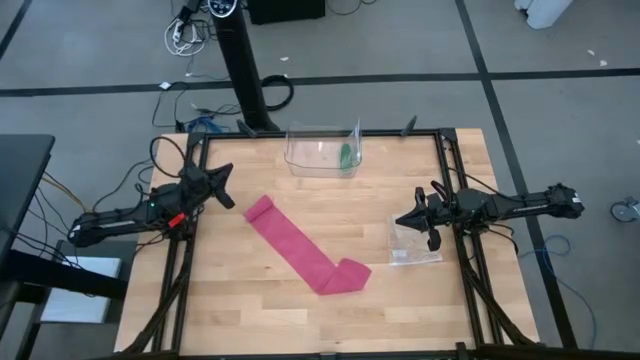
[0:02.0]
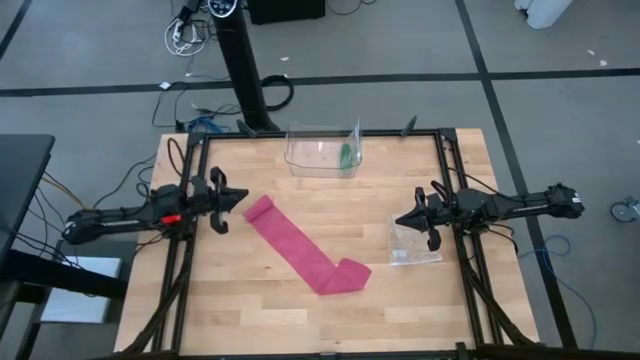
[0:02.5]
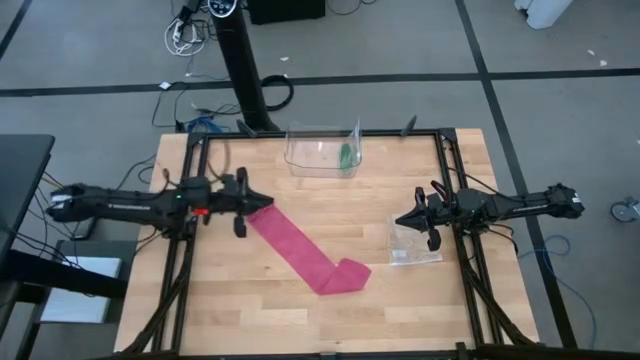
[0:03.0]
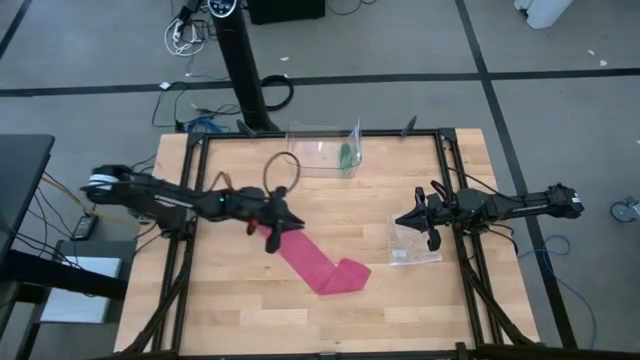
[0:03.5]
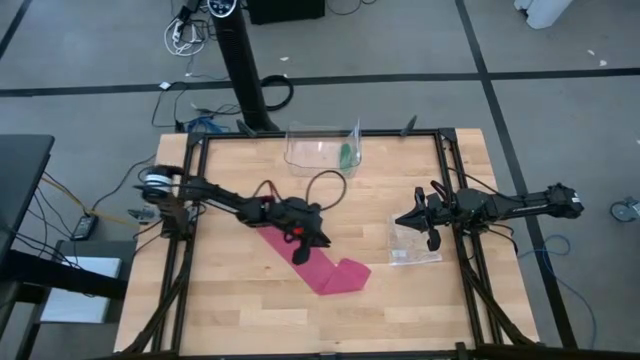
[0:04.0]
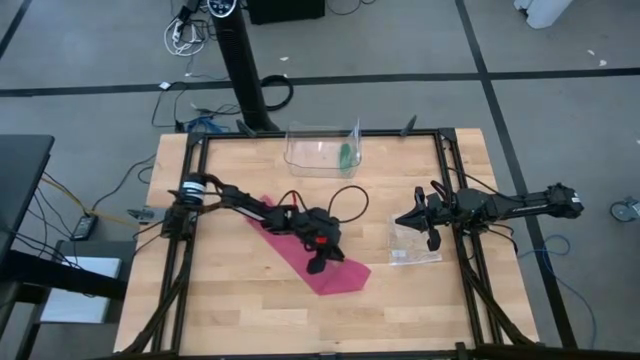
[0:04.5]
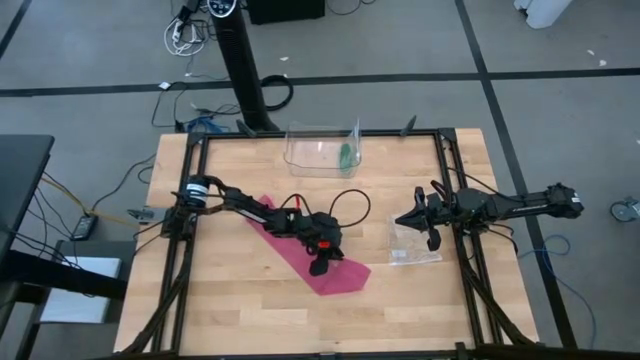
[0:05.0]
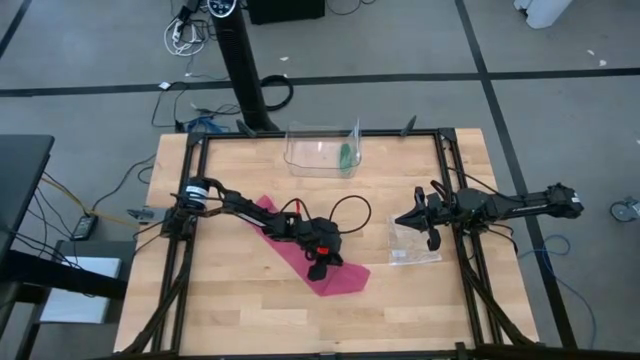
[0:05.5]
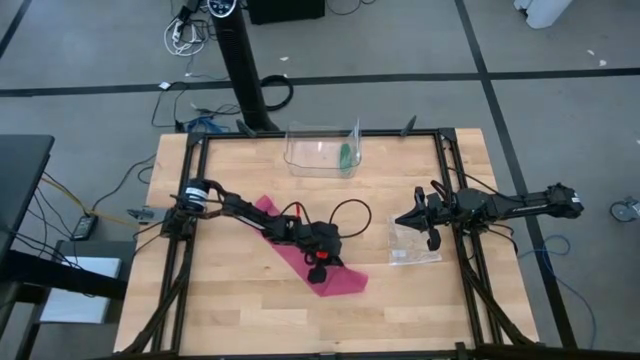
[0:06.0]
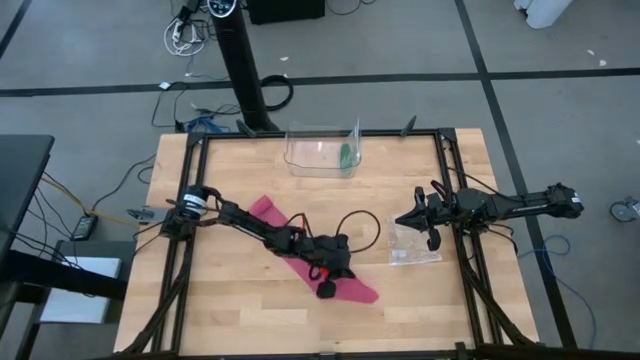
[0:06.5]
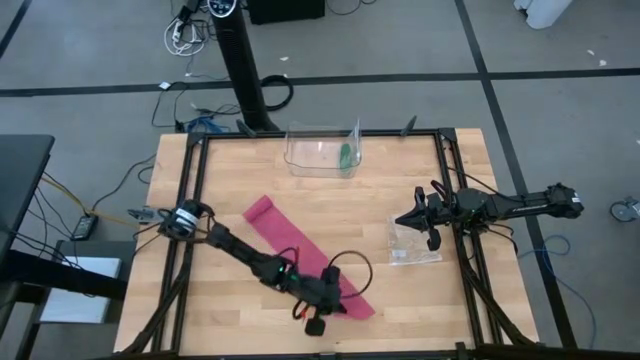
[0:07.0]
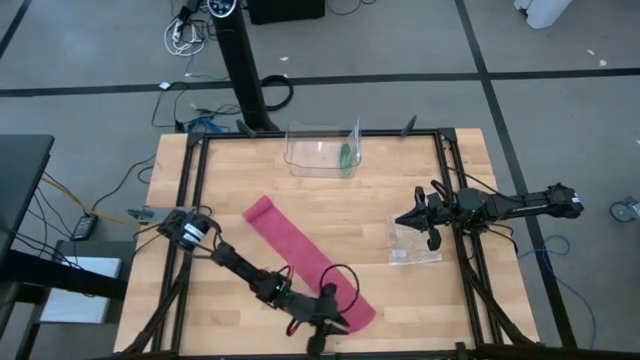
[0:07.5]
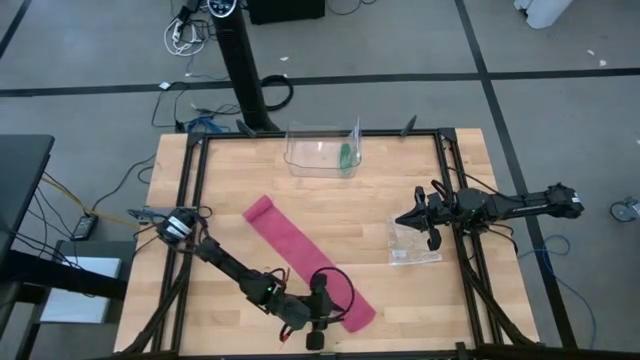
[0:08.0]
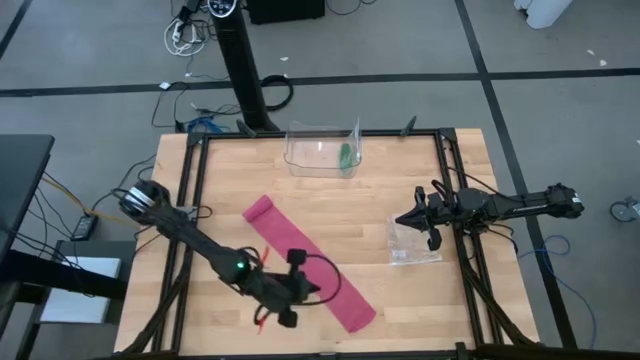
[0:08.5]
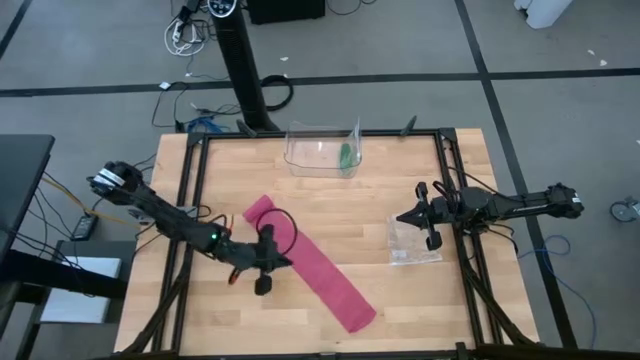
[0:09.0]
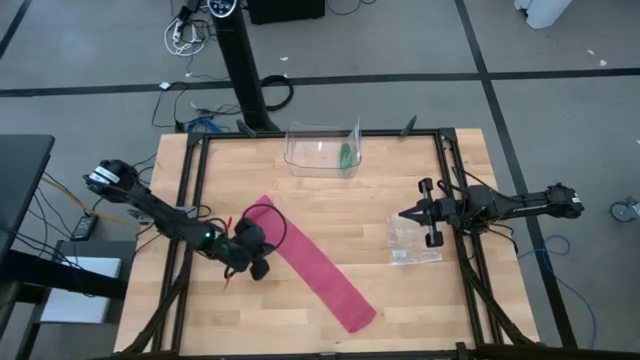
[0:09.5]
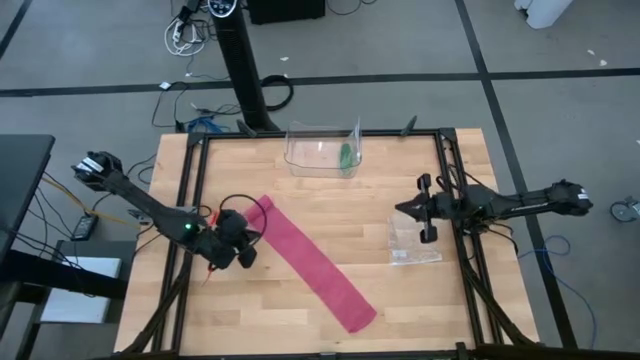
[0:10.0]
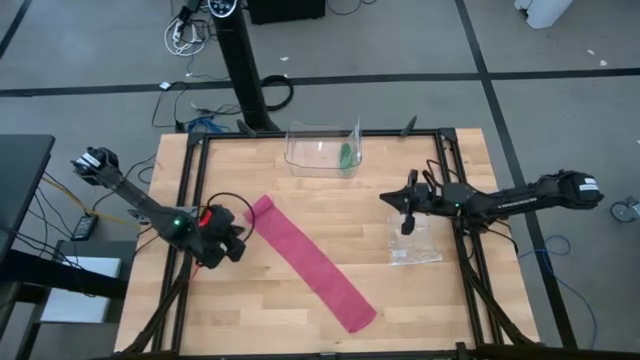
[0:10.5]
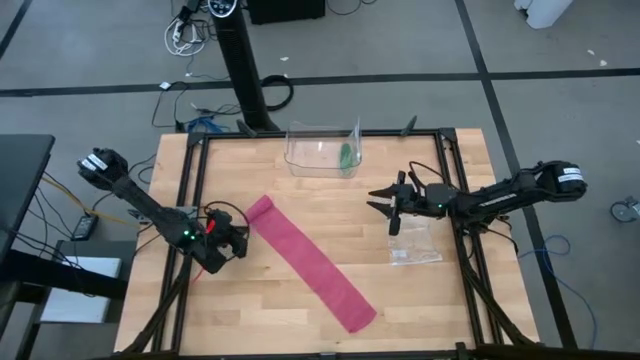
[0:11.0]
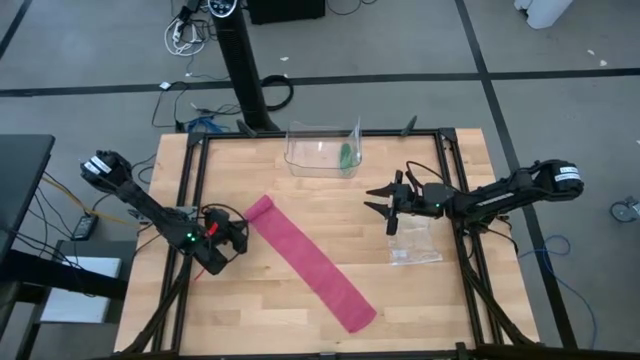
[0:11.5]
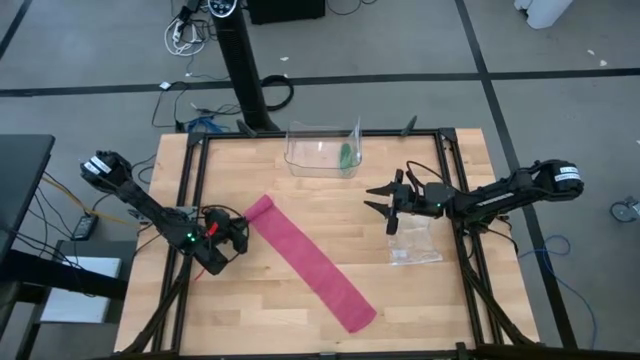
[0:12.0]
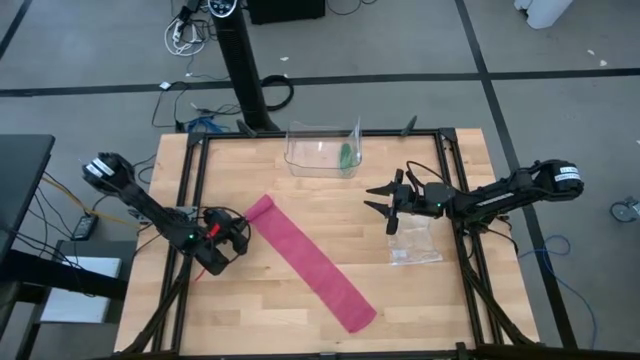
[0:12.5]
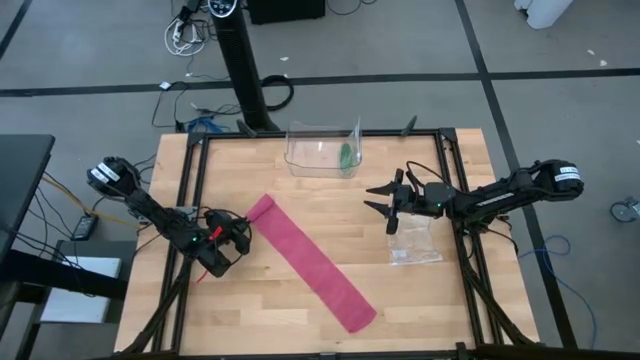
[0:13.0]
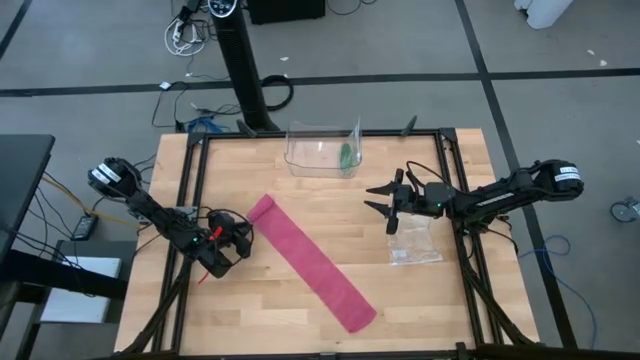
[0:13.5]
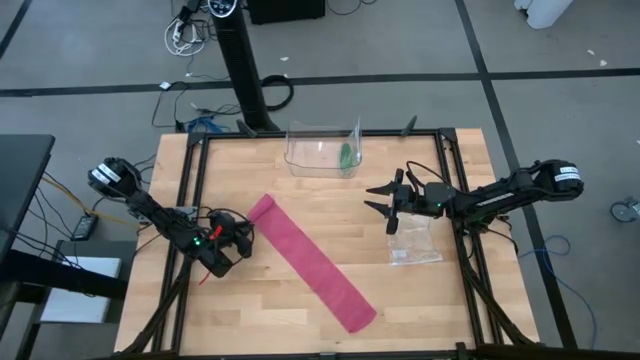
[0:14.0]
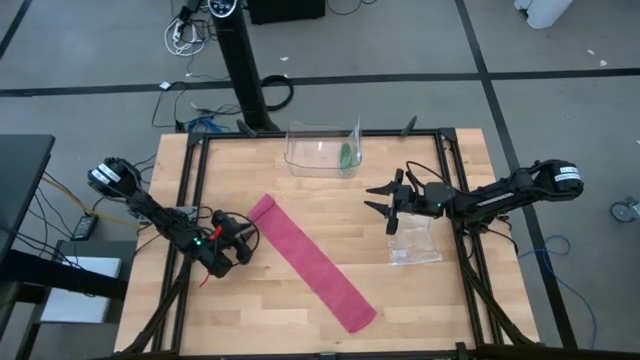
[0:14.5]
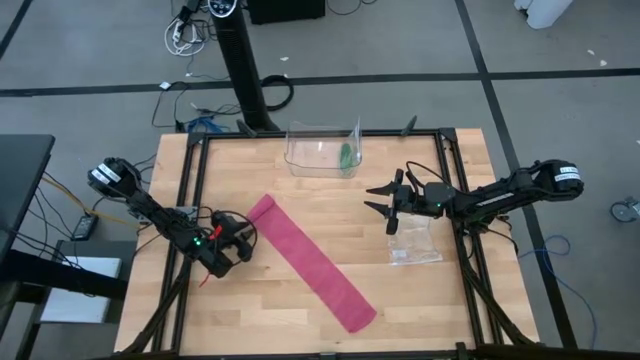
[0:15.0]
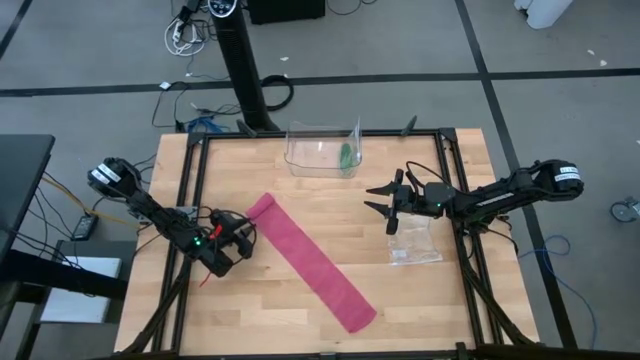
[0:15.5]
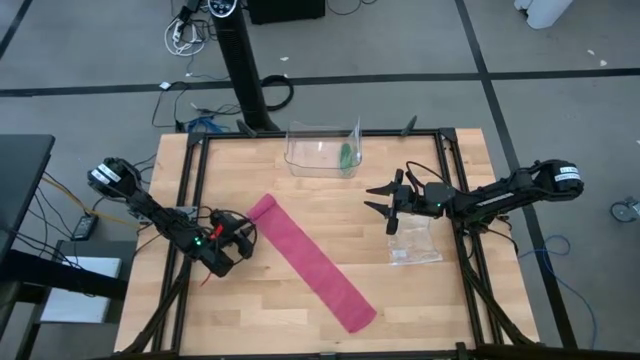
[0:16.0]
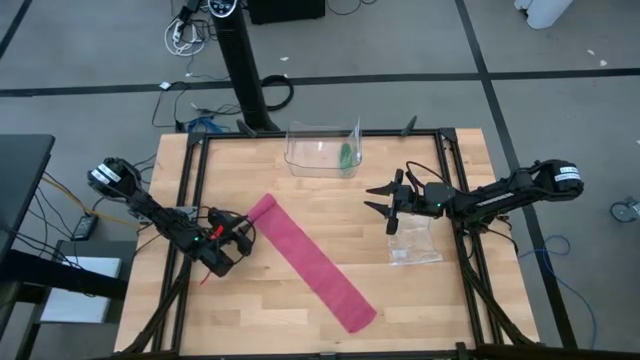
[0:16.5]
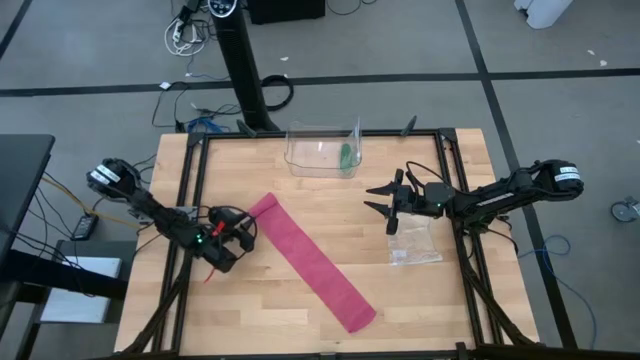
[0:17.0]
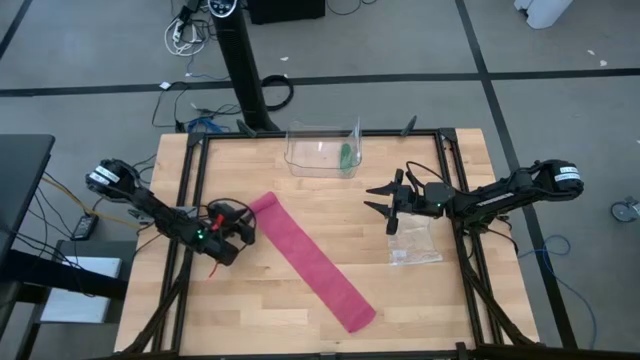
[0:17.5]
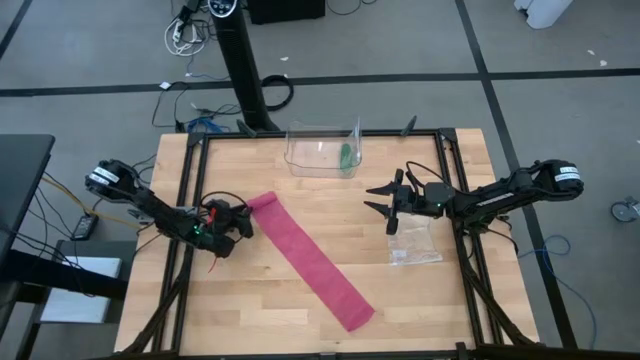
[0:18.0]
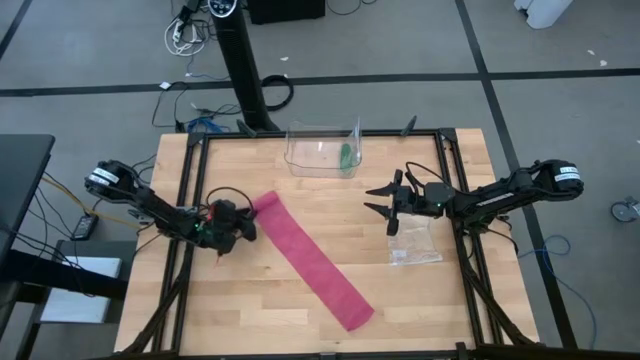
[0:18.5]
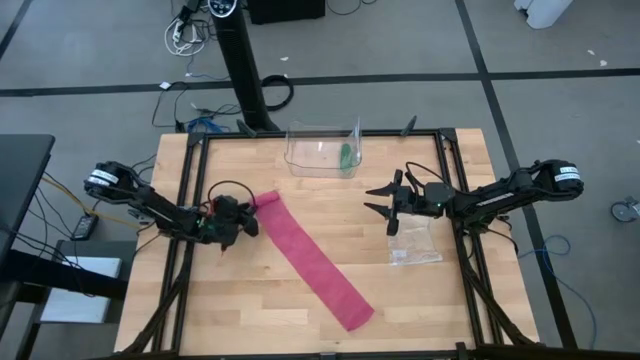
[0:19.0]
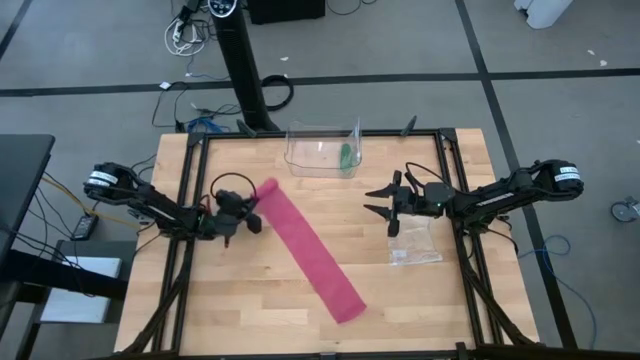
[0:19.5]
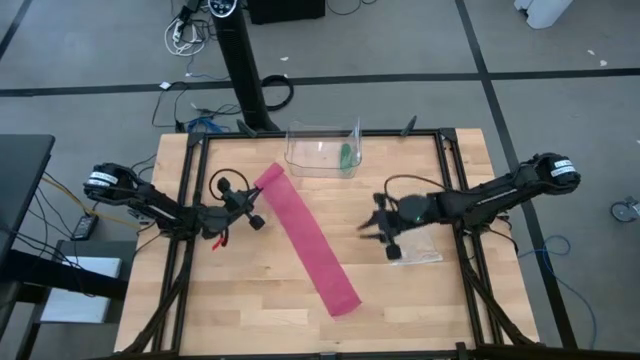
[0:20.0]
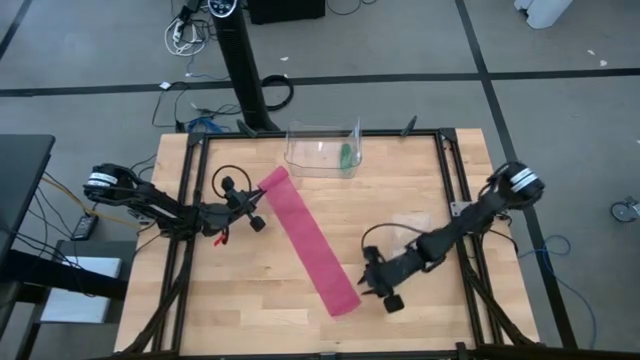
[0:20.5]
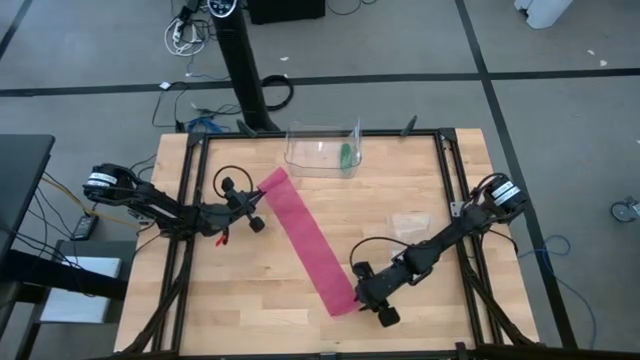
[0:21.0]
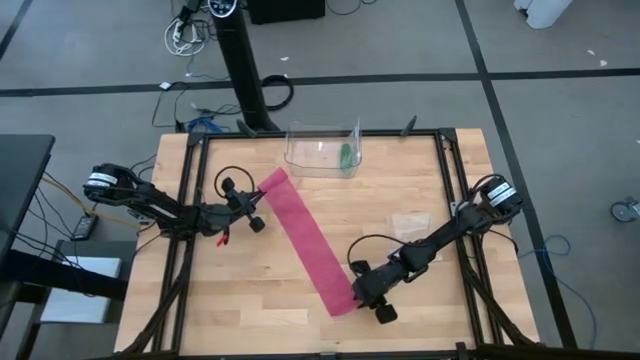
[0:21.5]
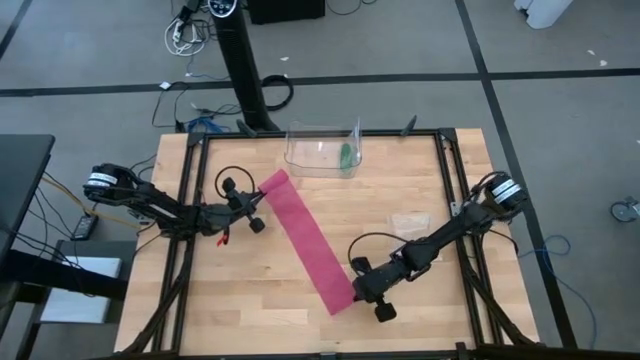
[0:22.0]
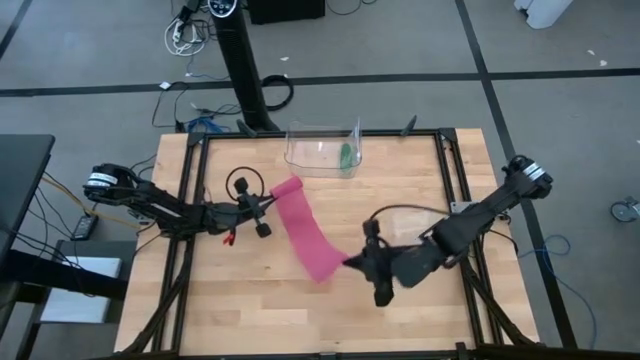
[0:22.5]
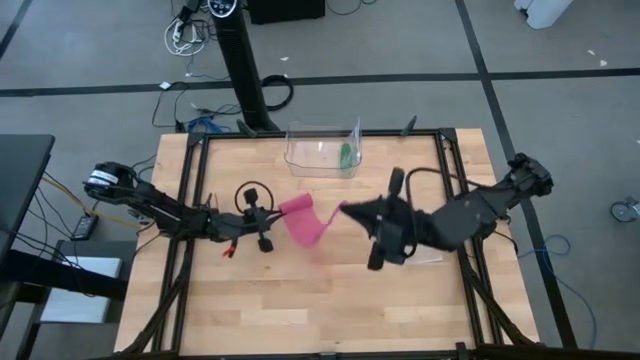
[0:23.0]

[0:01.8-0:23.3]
Task: Roll bandage
Roll the pink bandage
